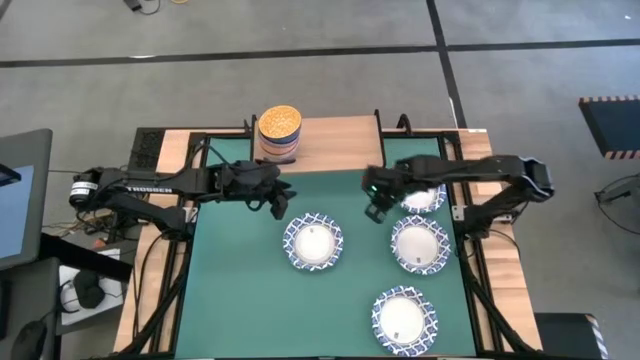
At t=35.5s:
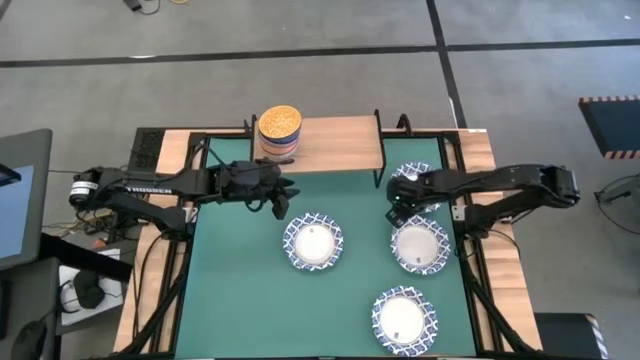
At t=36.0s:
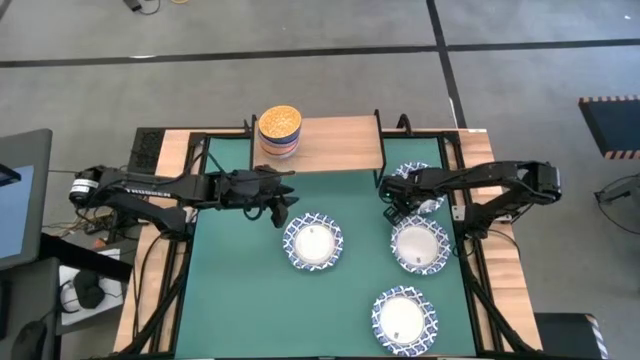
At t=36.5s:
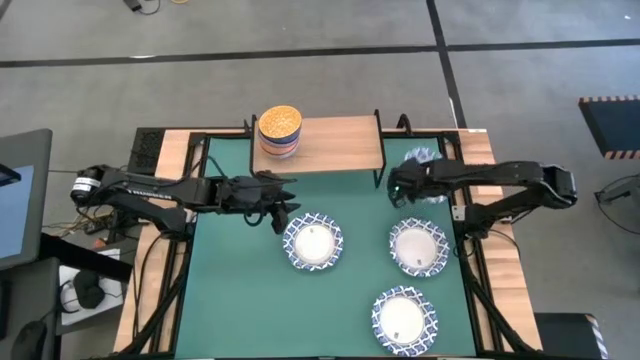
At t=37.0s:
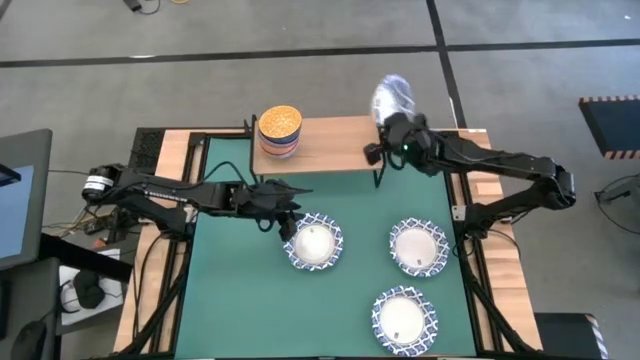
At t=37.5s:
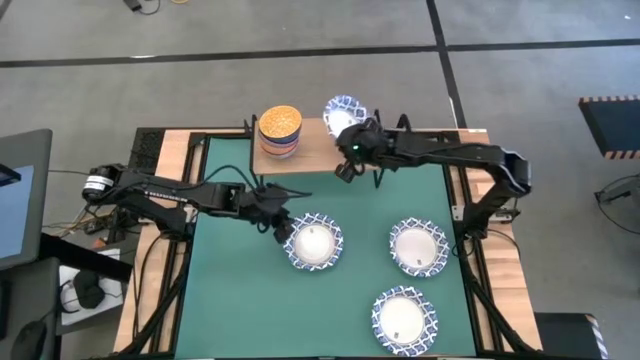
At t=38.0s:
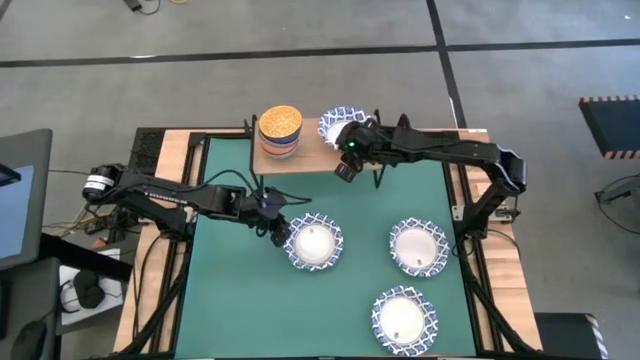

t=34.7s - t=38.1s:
Task: Place and stack bowls onto a shelf
Put the white patterned bowl on the shelf

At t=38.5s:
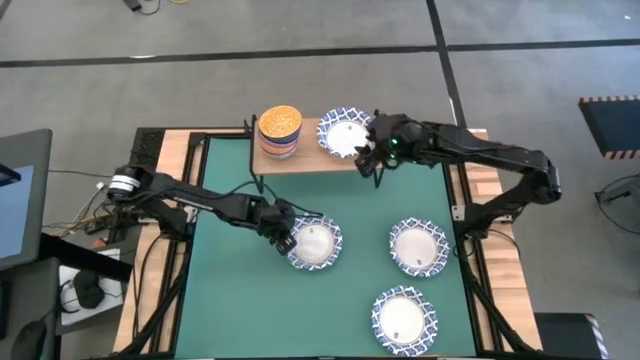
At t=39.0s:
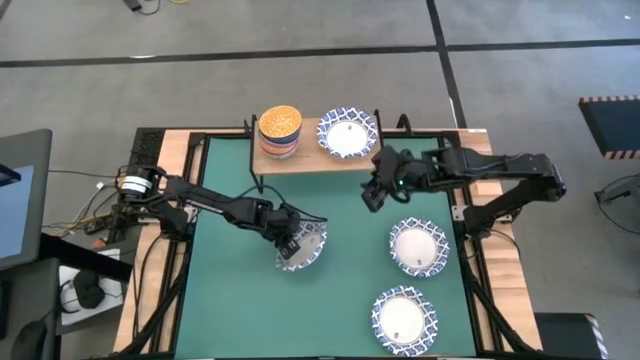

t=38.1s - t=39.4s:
Stack the white patterned bowl on top of the white patterned bowl on the shelf

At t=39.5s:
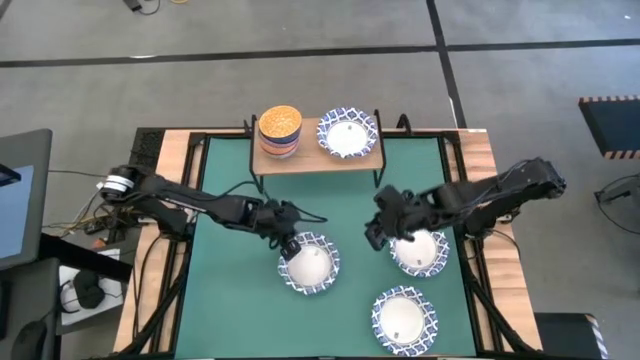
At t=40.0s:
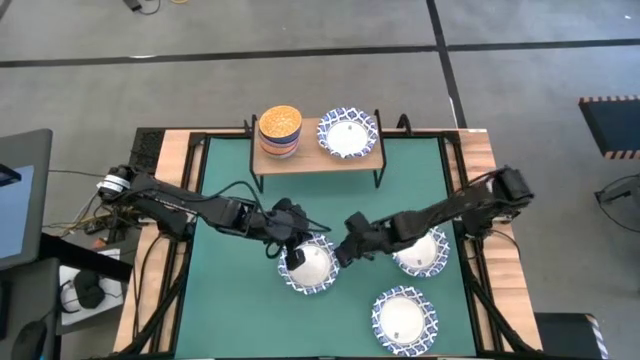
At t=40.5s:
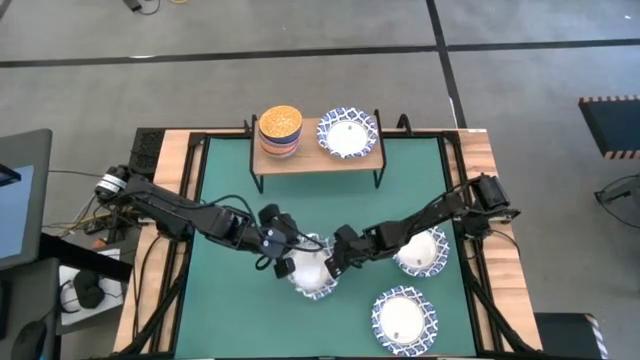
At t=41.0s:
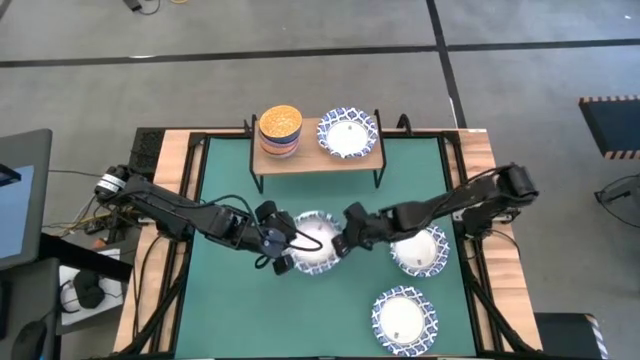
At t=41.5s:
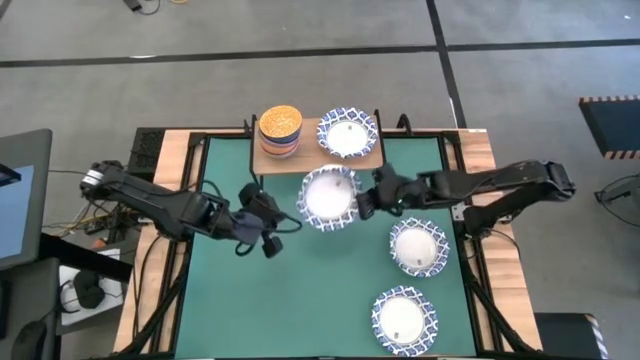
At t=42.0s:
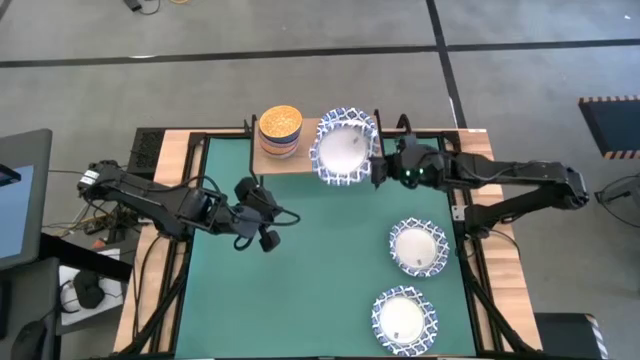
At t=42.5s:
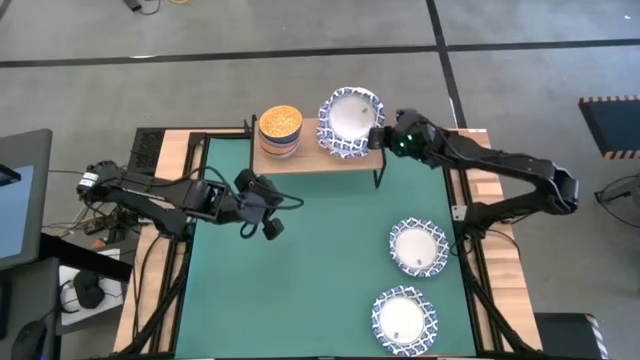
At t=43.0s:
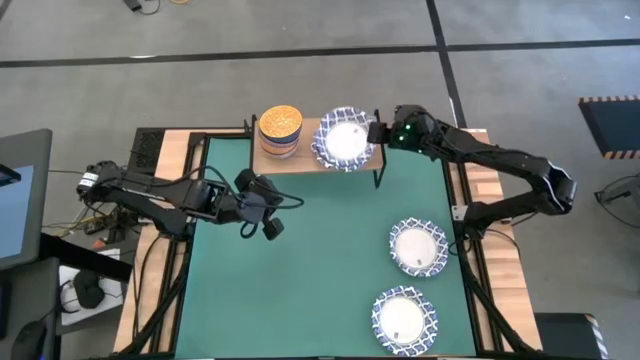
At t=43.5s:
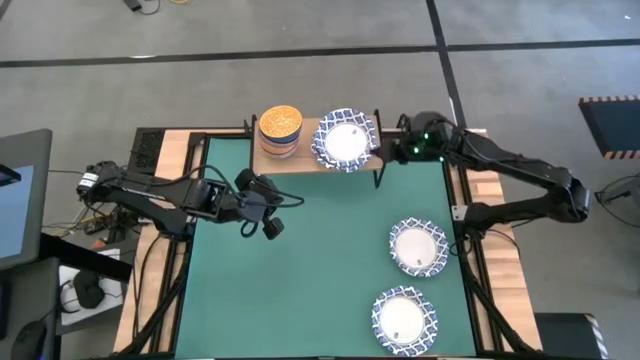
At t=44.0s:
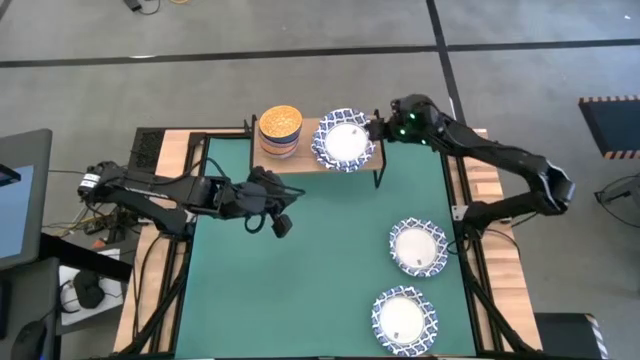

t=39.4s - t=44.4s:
Stack the white patterned bowl on top of the white patterned bowl on the shelf

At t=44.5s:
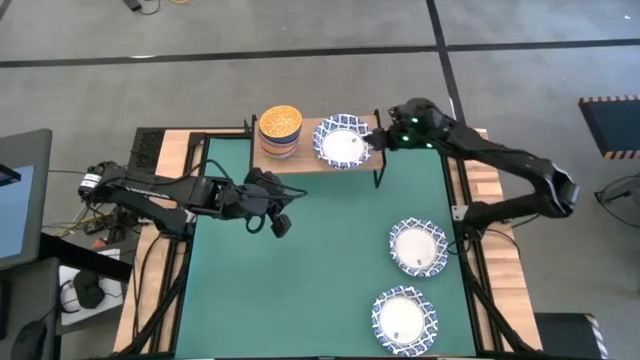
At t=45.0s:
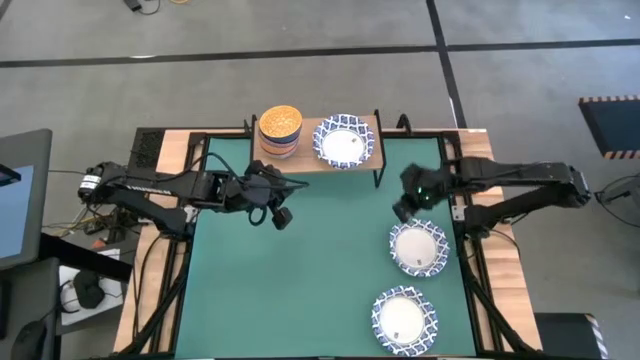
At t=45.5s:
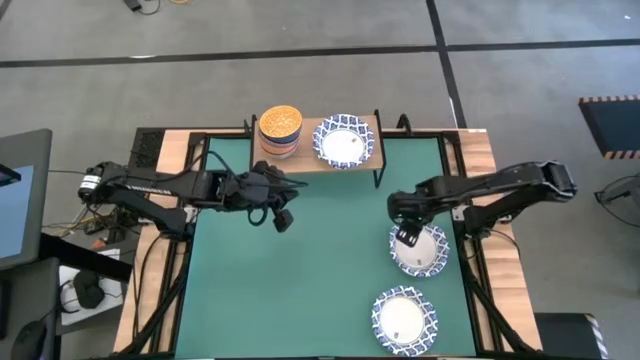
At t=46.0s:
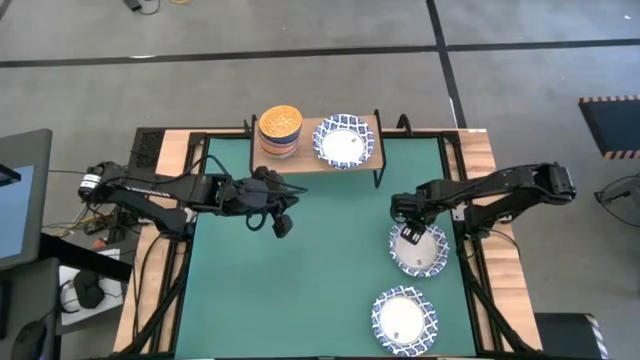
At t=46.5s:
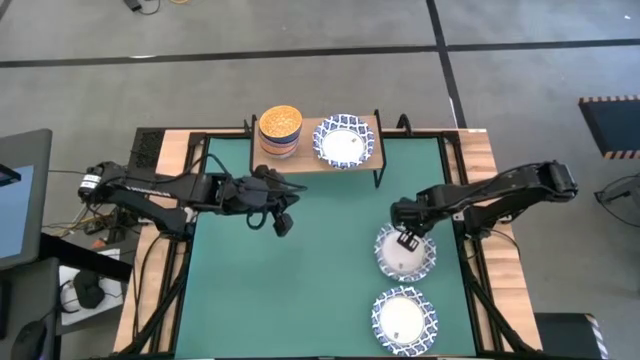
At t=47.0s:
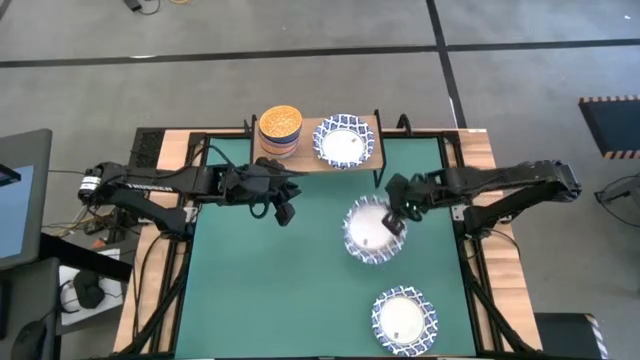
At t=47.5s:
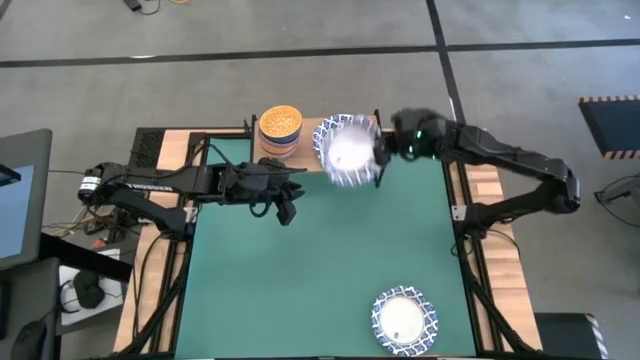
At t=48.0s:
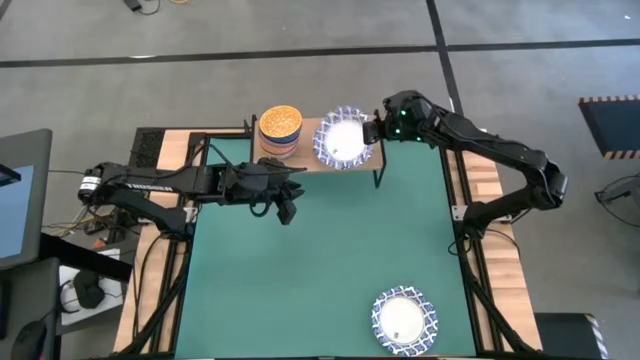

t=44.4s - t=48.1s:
Stack the white patterned bowl on top of the white patterned bowl on the shelf

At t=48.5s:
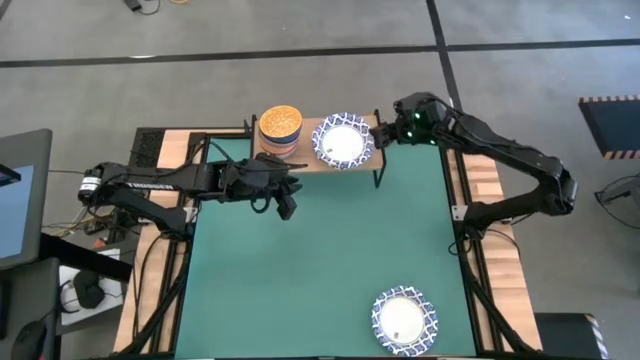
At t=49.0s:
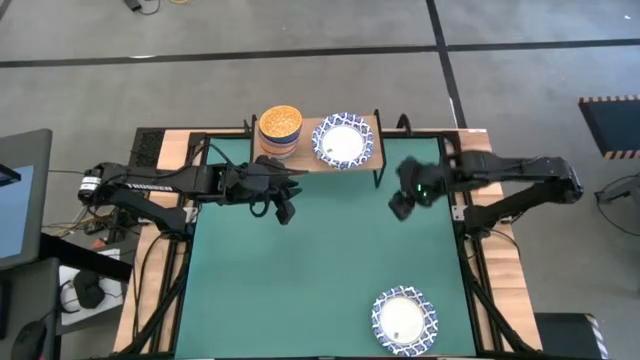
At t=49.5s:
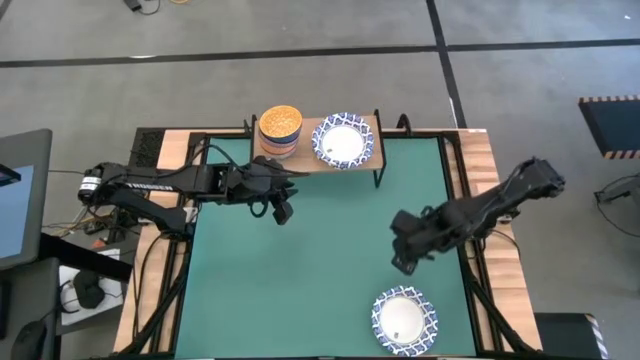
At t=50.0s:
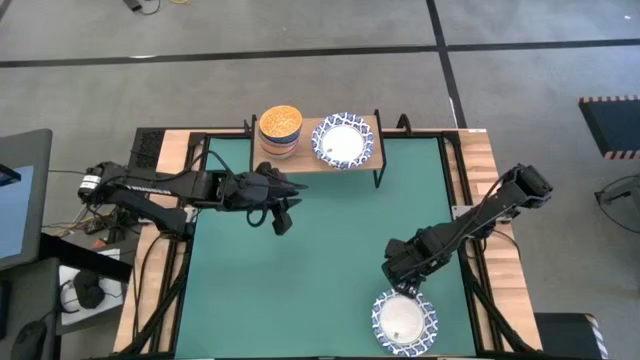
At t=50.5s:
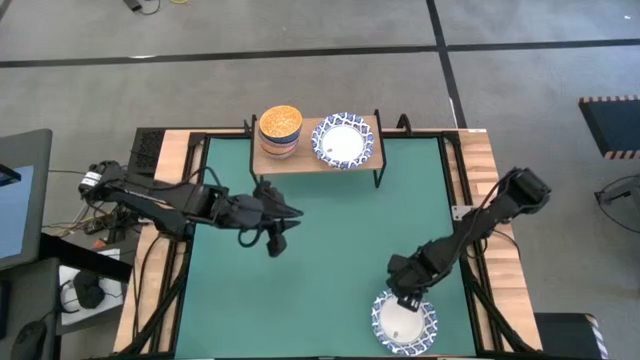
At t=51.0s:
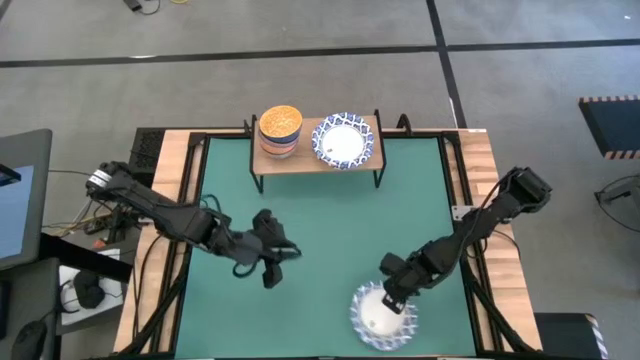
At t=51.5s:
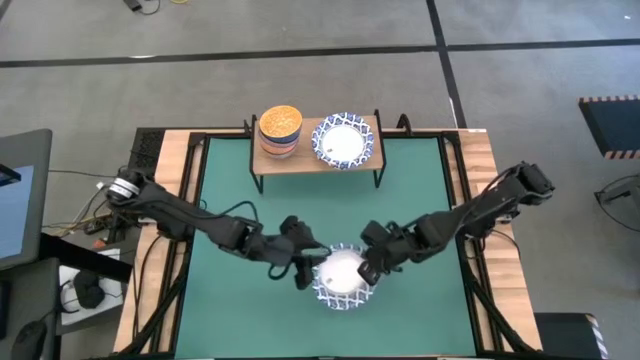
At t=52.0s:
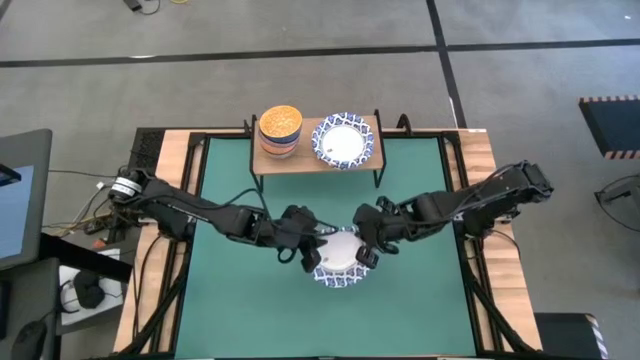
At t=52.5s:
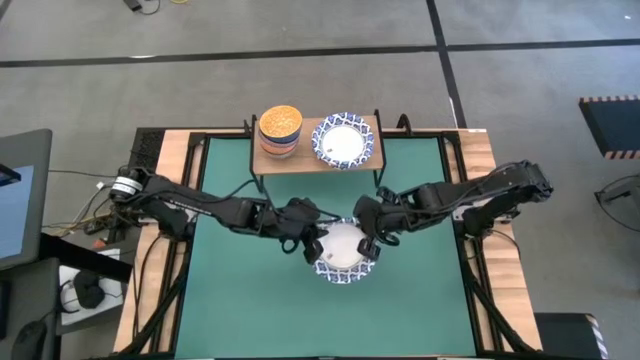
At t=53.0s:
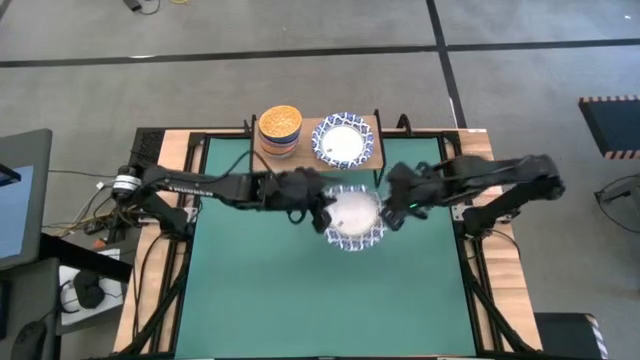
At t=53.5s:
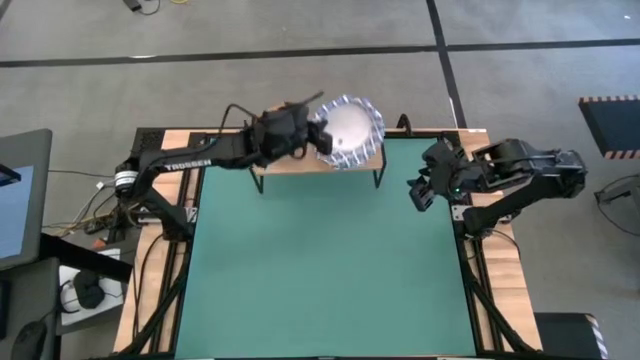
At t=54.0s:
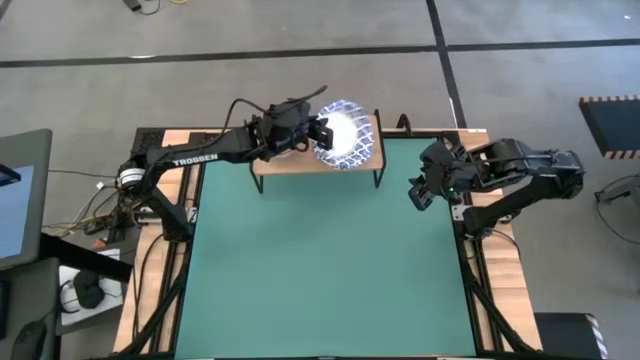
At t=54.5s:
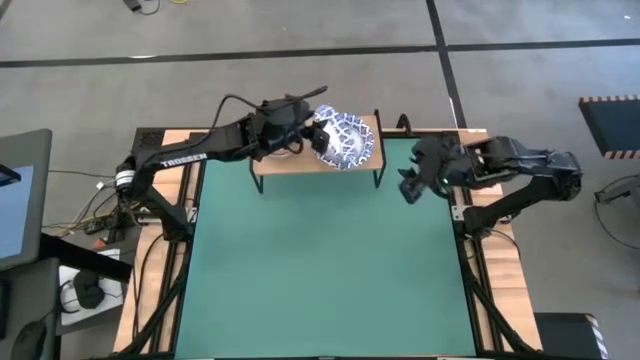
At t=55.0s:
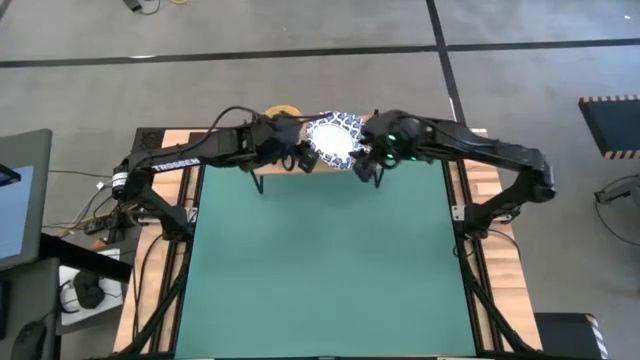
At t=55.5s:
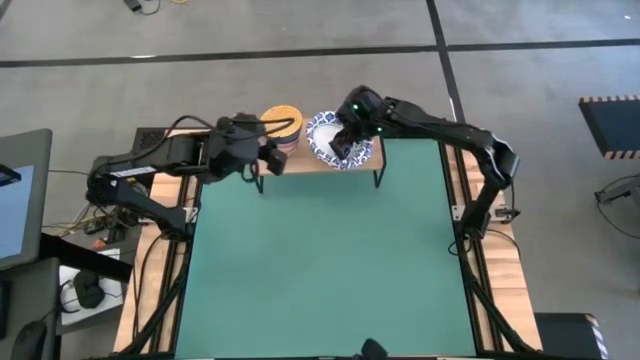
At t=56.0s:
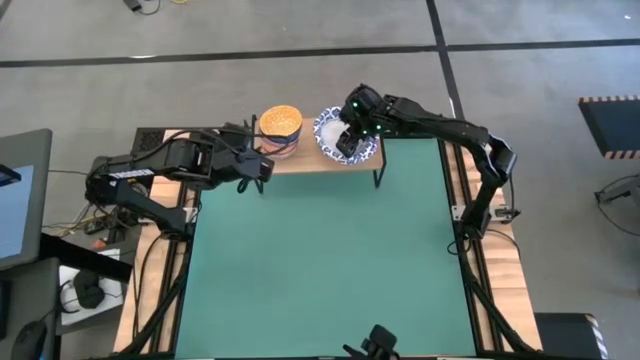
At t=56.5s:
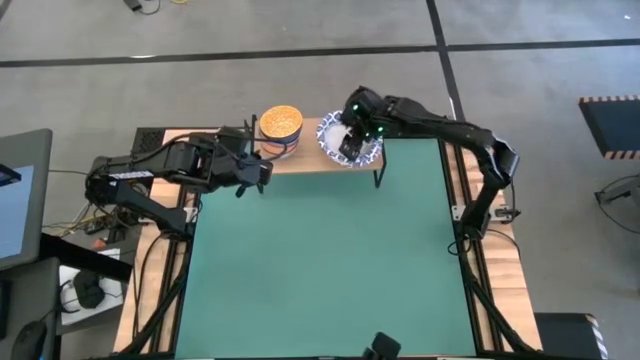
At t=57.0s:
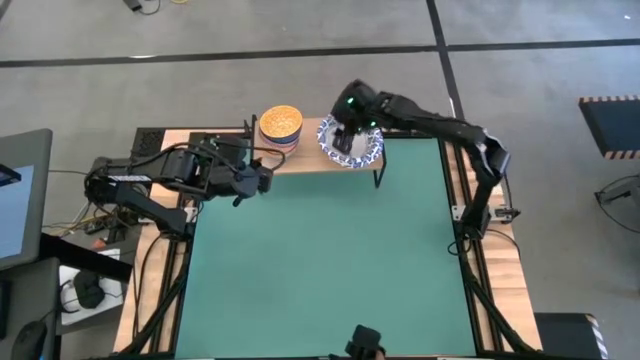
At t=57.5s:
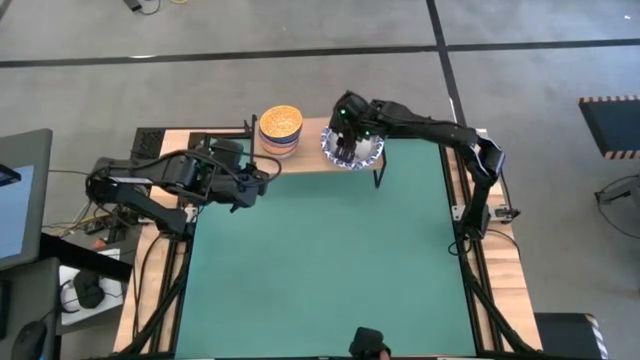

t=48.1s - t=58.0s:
Stack the white patterned bowl on top of the white patterned bowl on the shelf
